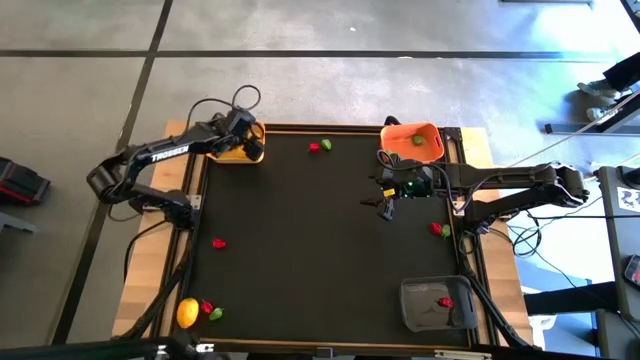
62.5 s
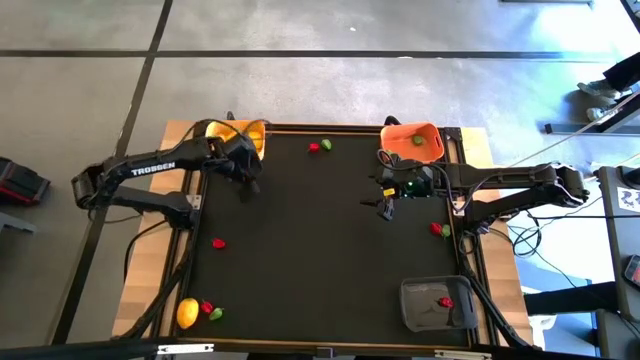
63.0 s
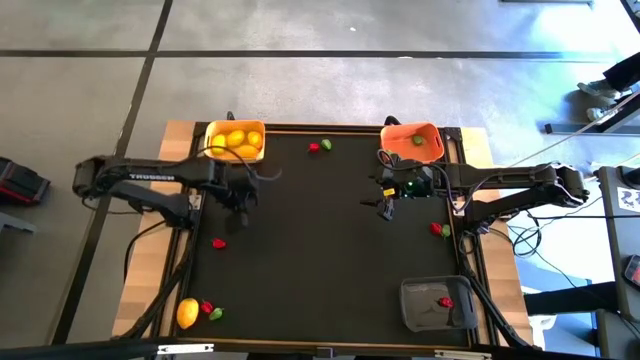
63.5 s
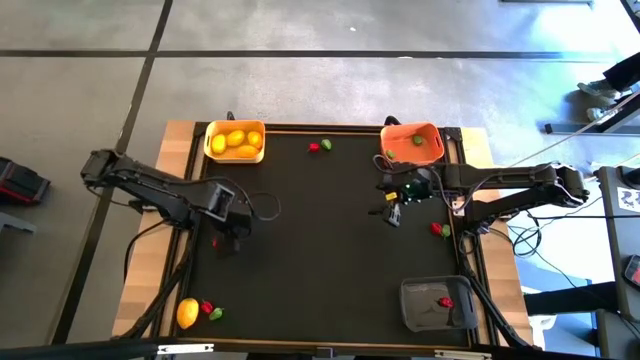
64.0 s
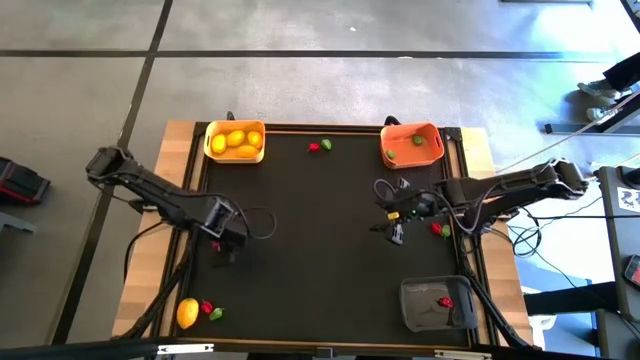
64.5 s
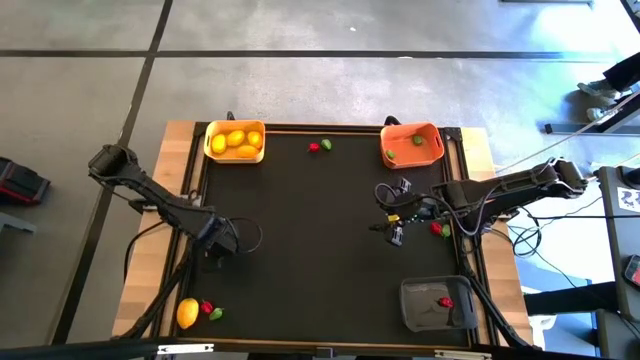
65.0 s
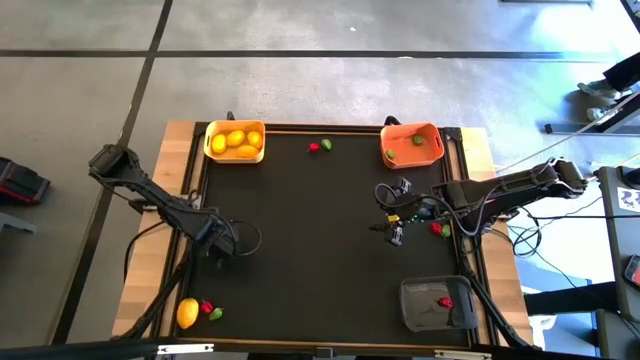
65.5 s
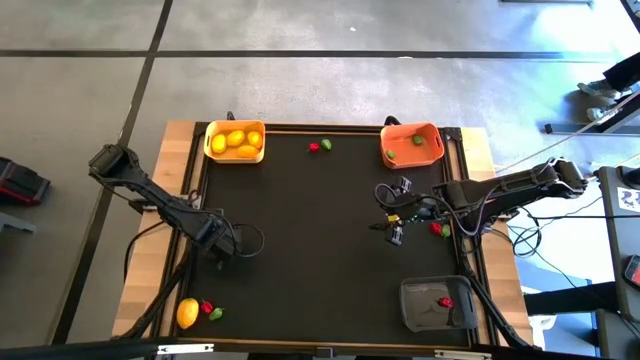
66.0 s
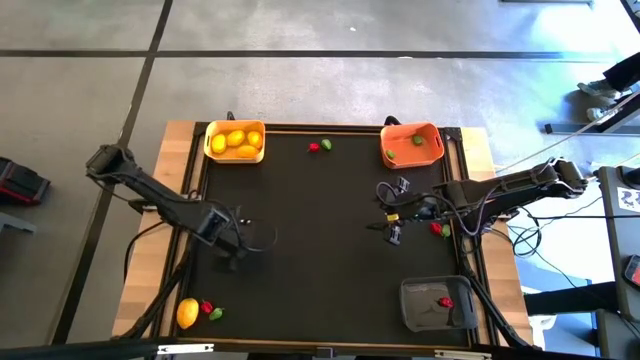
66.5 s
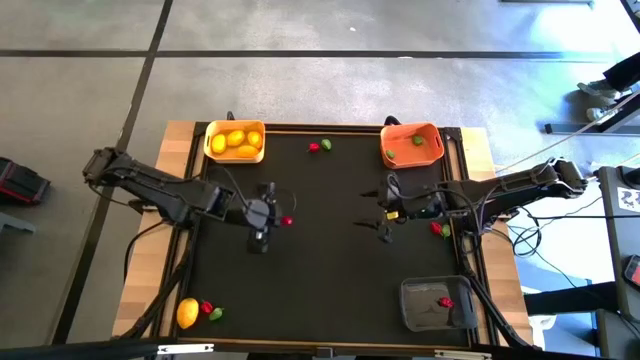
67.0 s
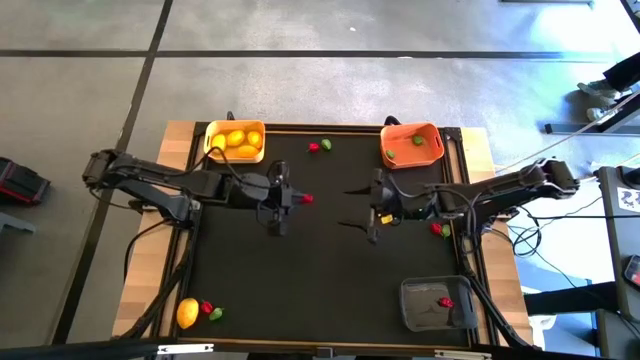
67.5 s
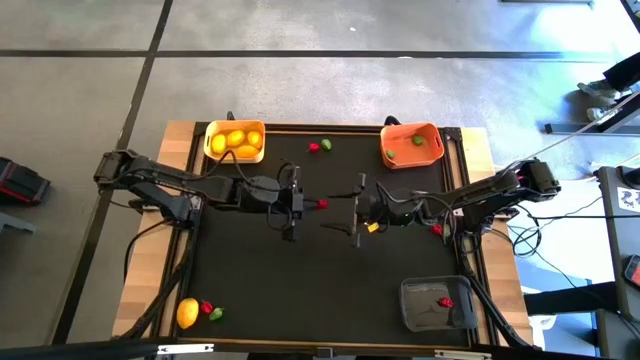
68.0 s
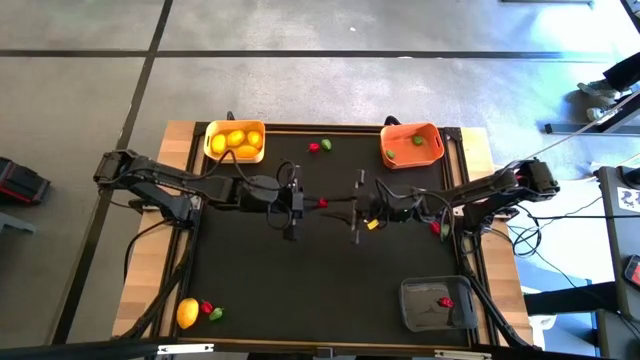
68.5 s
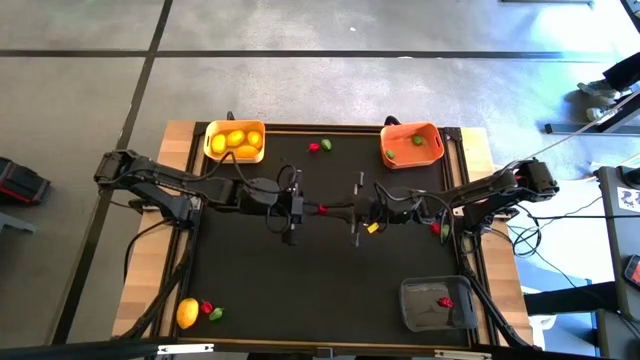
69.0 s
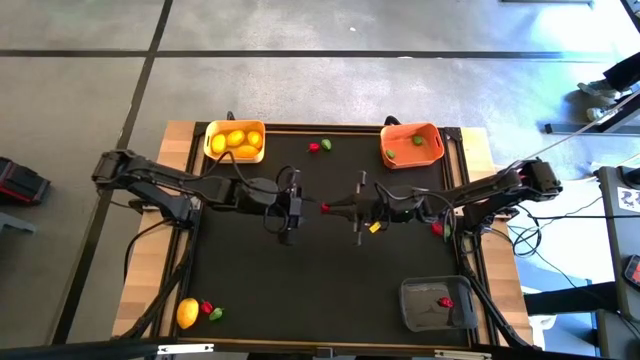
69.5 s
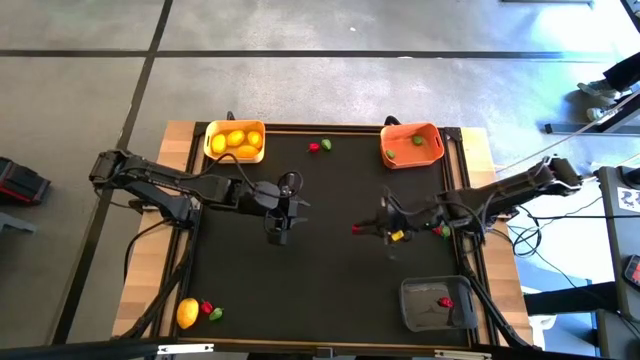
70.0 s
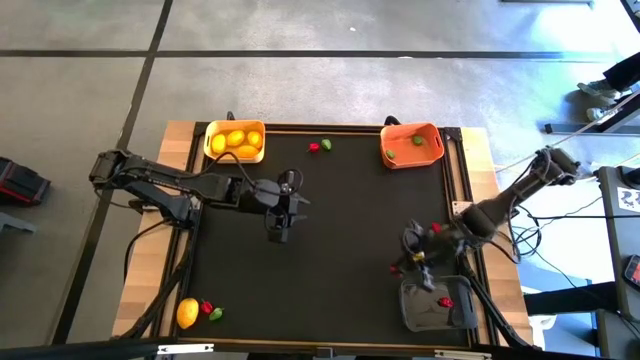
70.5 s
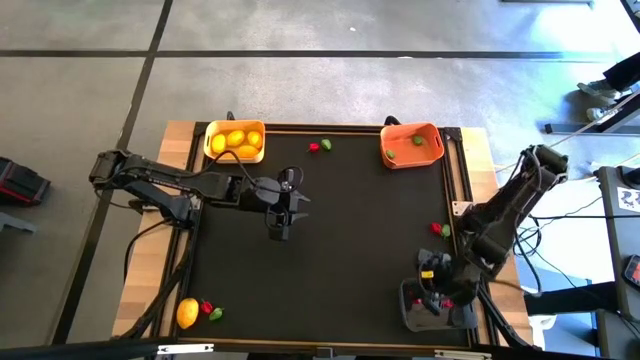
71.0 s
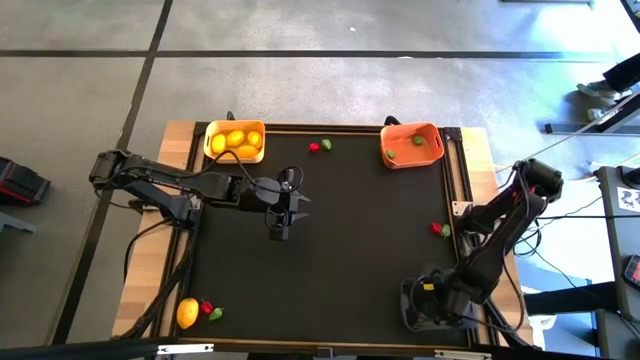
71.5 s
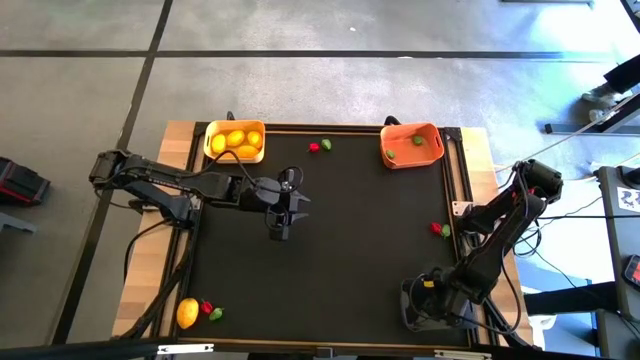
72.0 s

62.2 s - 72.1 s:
Task: Sort produce into baskets
Put the red chili pepper into the gray bin

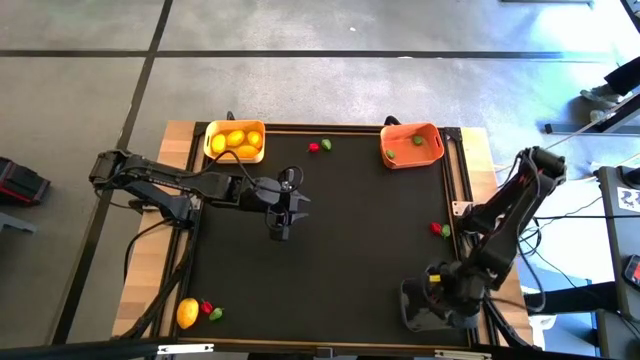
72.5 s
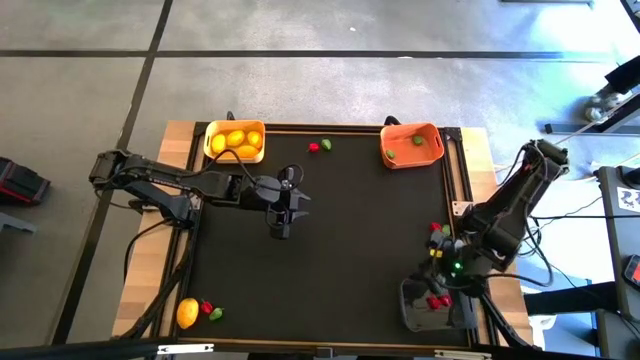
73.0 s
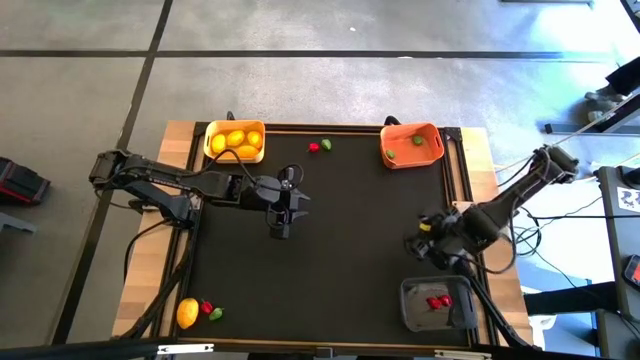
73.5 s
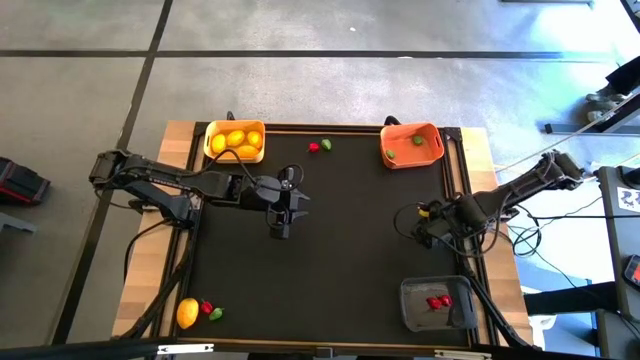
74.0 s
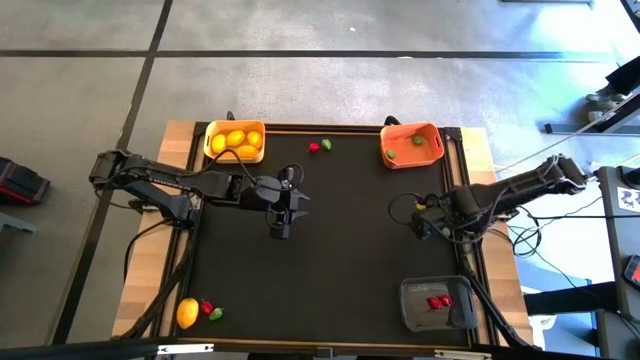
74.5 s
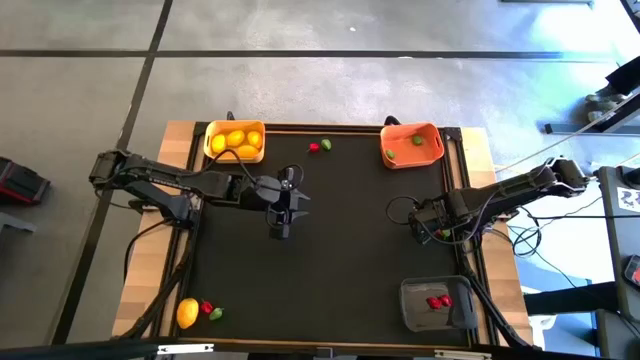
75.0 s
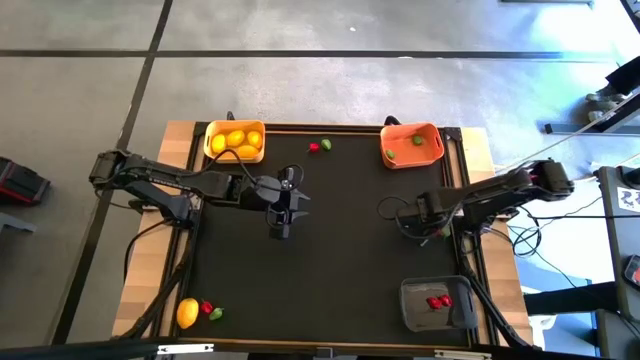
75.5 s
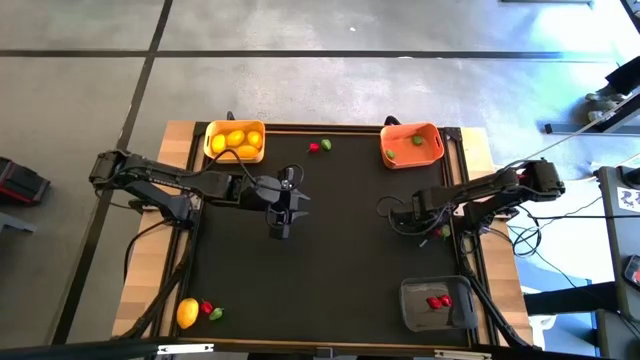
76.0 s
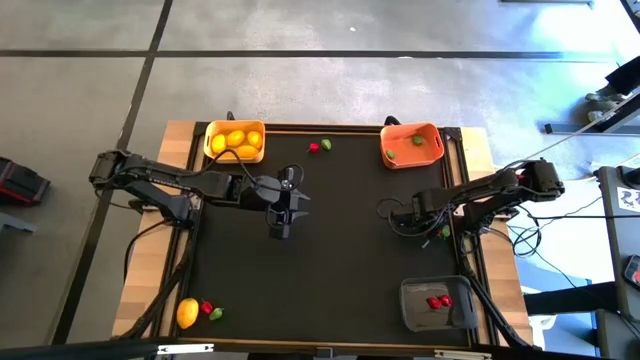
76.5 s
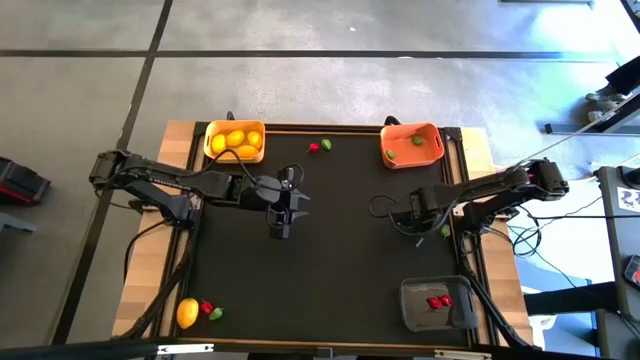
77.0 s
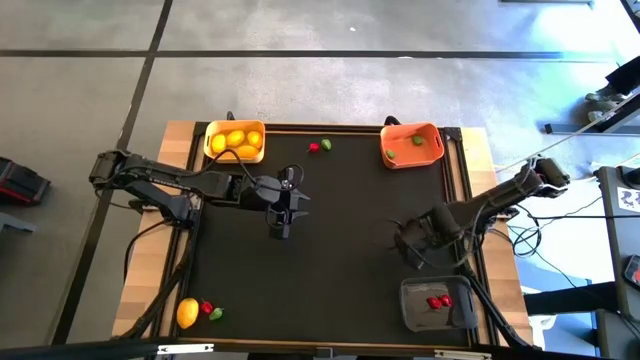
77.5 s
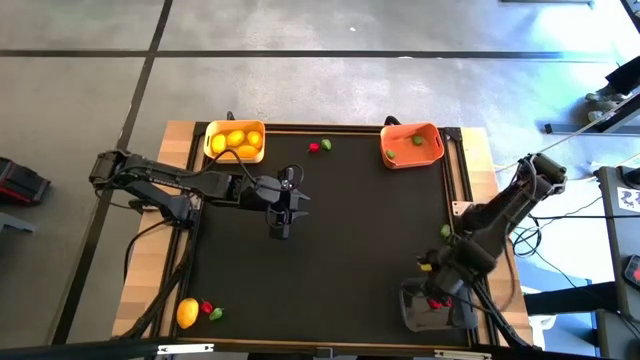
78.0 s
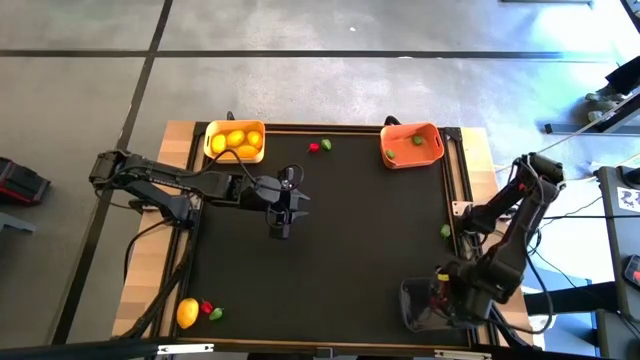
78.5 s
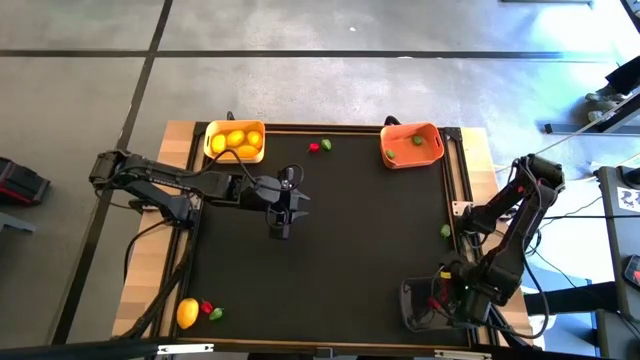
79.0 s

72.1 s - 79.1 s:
Put the red chili pepper into the gray bin

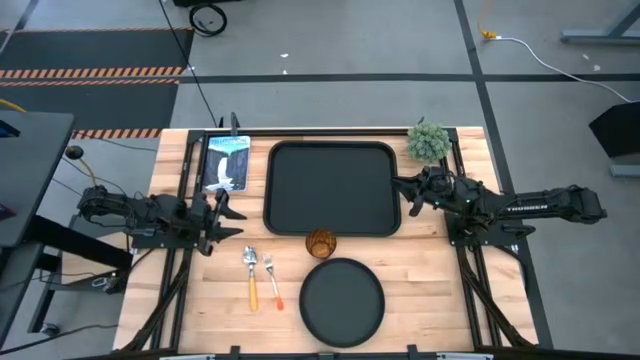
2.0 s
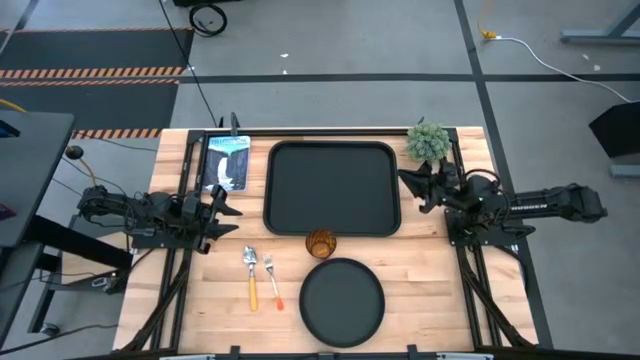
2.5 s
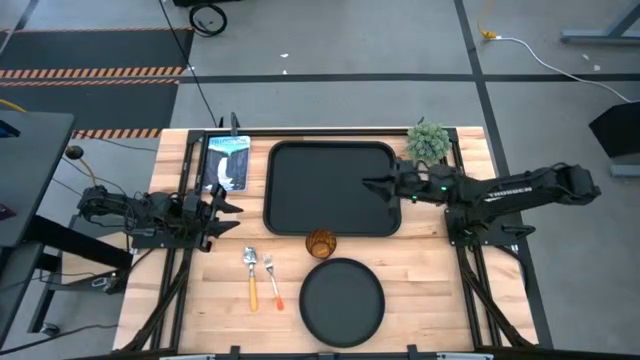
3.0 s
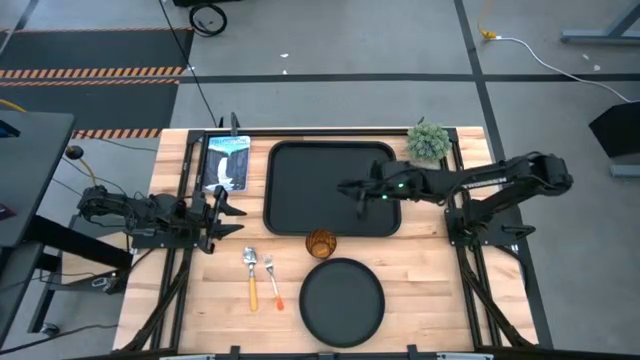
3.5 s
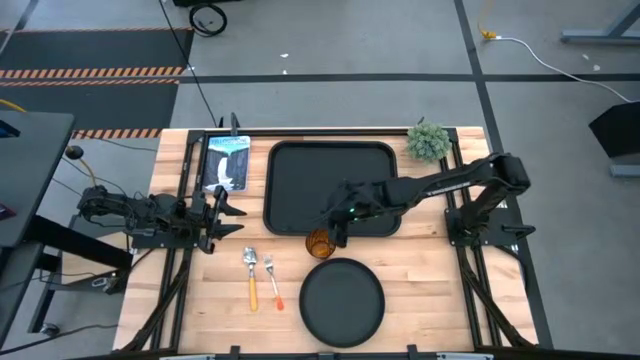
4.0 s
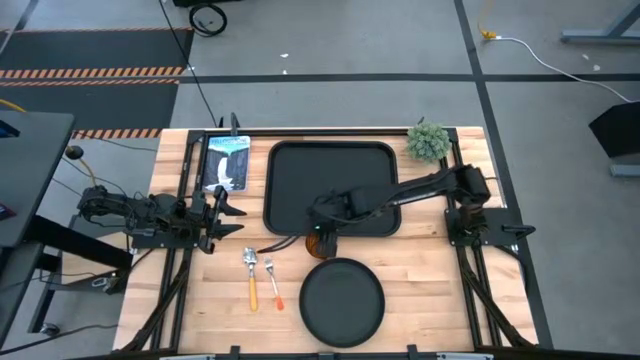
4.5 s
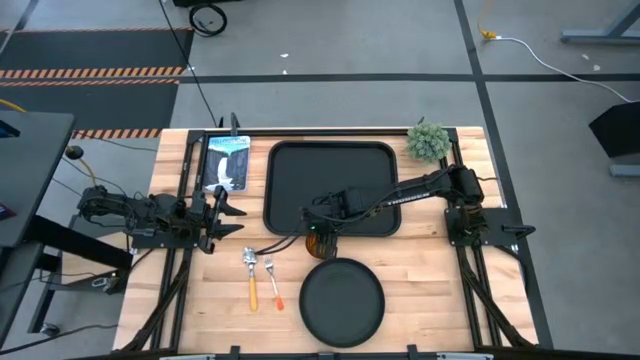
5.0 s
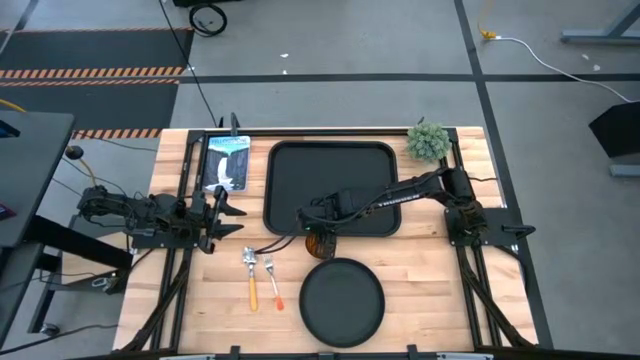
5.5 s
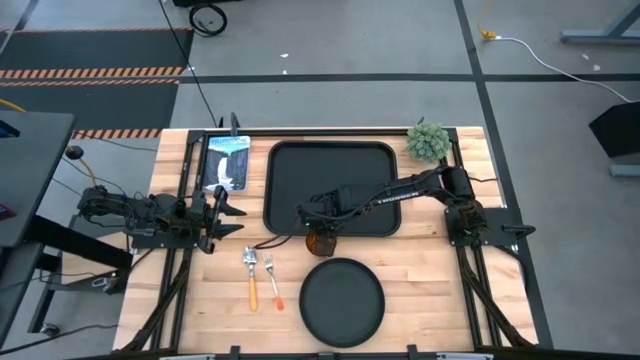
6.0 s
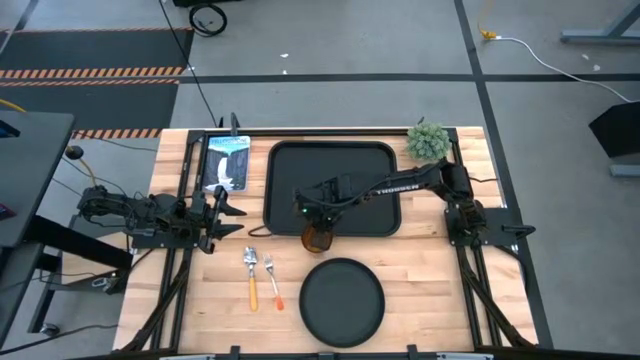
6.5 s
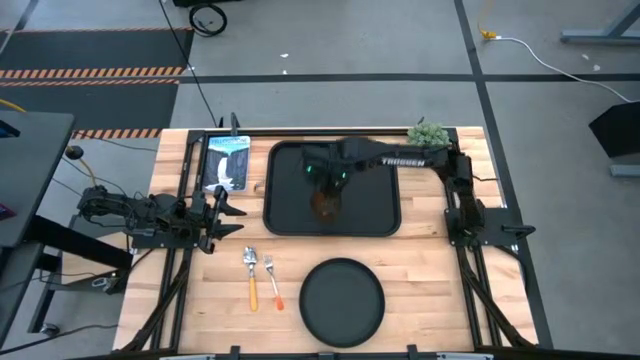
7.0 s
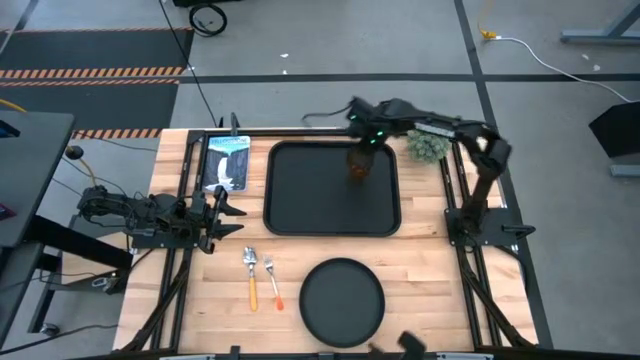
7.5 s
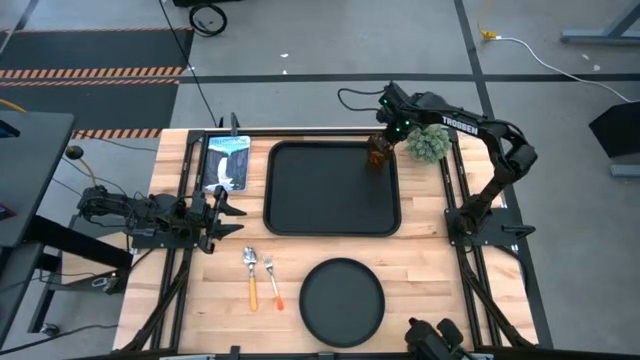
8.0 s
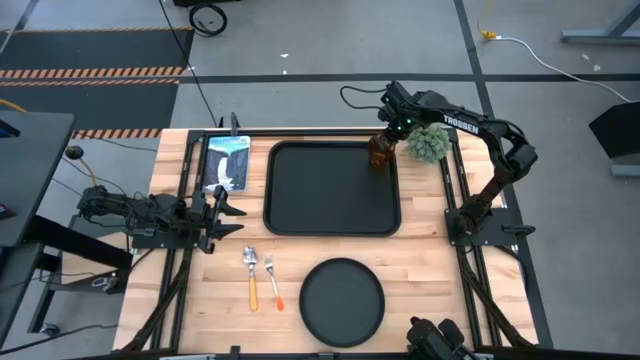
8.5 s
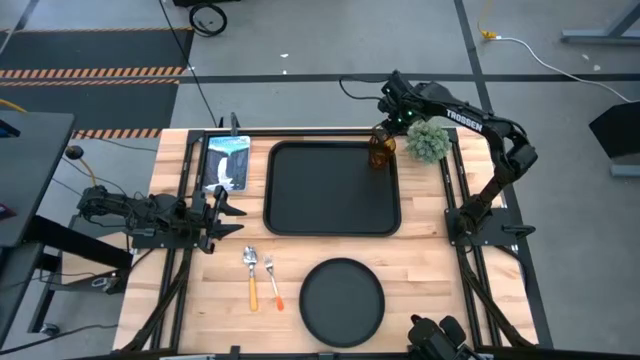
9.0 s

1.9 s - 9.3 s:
Task: Pick and place plate/cup/fork/spoon on tray
Put the brown cup on the black serving tray
